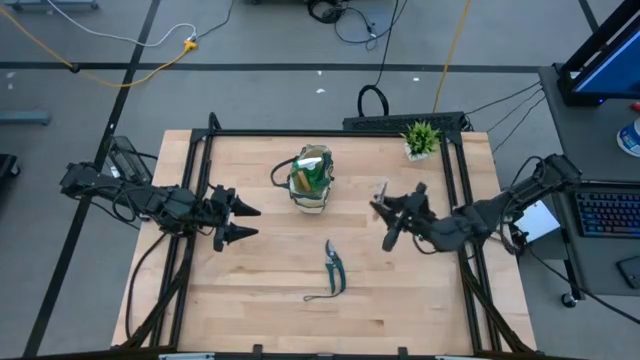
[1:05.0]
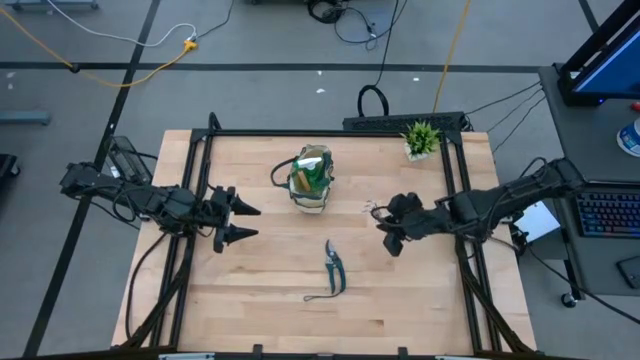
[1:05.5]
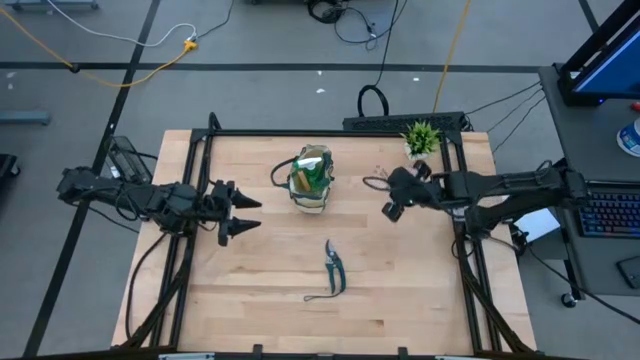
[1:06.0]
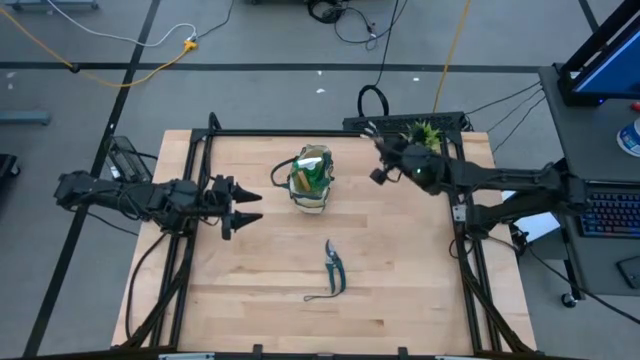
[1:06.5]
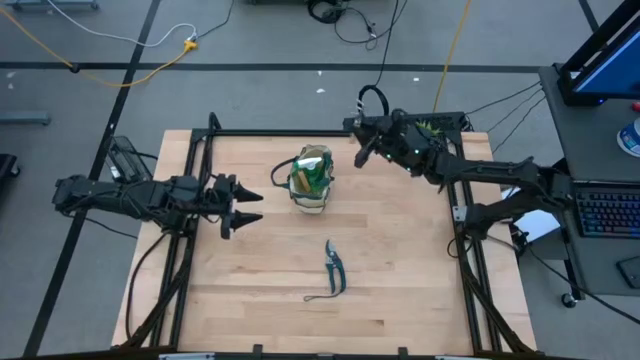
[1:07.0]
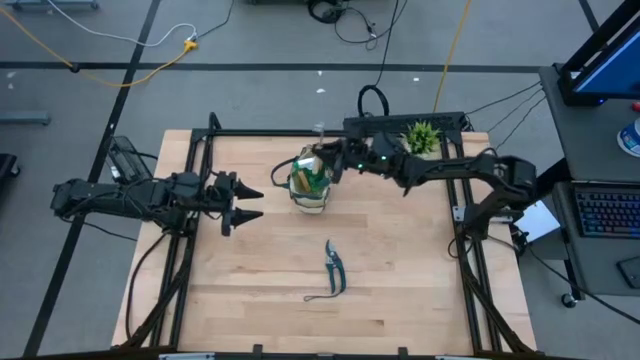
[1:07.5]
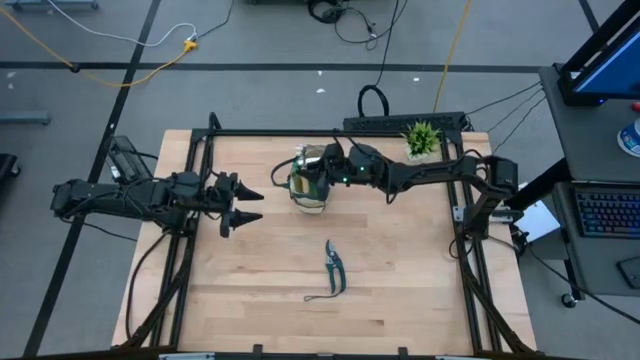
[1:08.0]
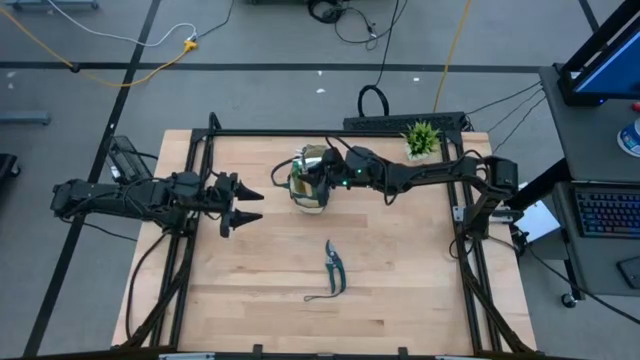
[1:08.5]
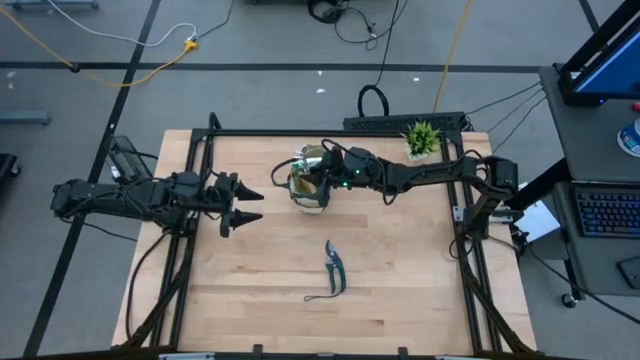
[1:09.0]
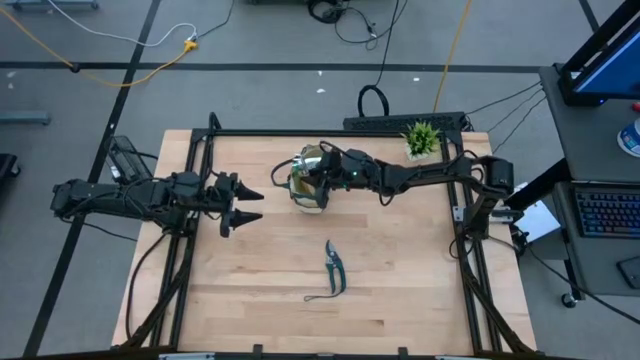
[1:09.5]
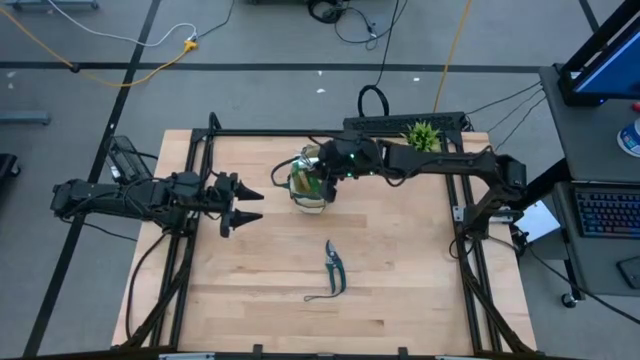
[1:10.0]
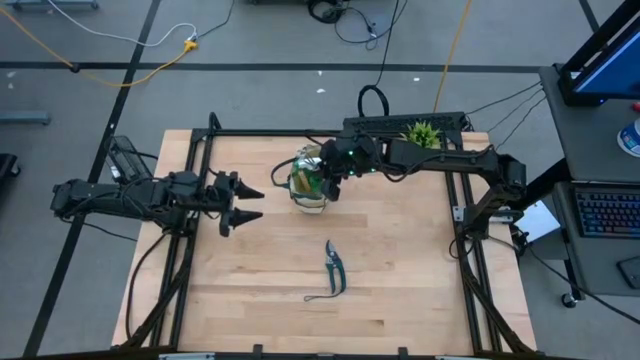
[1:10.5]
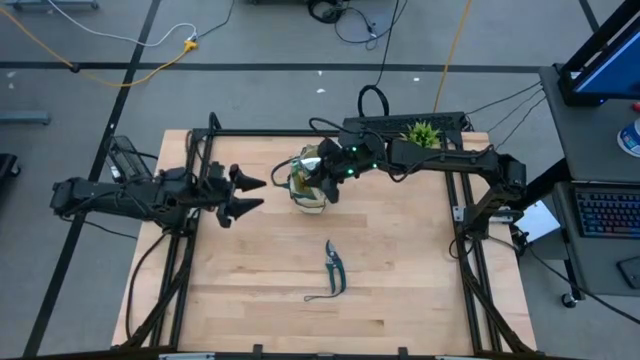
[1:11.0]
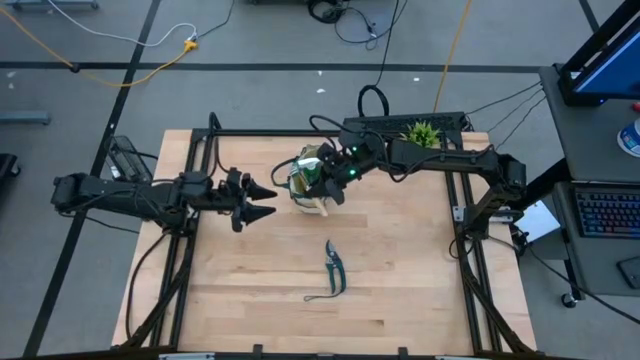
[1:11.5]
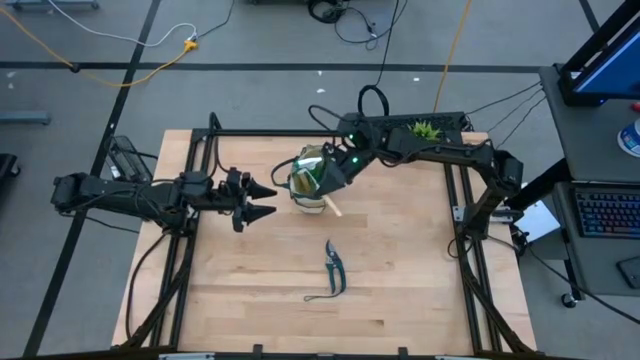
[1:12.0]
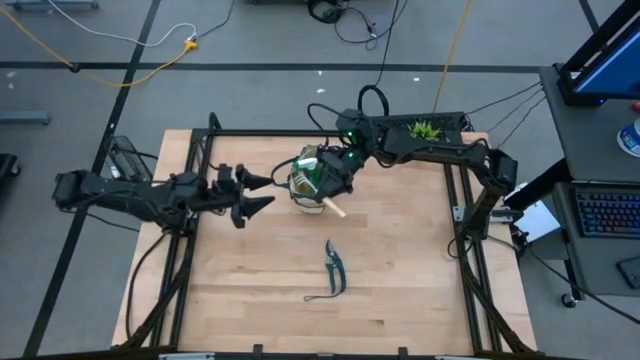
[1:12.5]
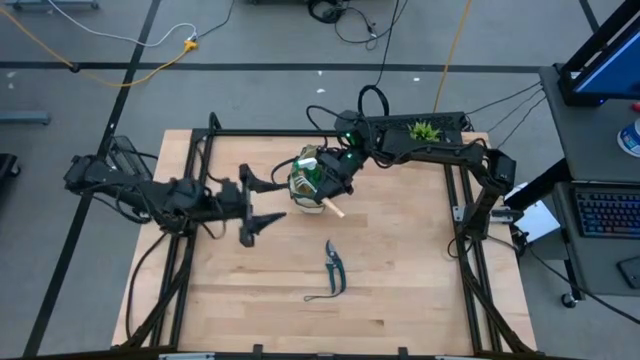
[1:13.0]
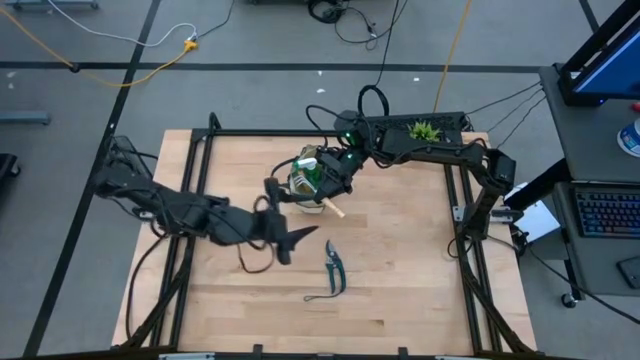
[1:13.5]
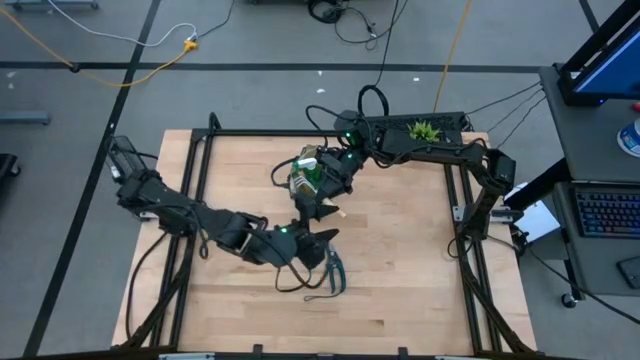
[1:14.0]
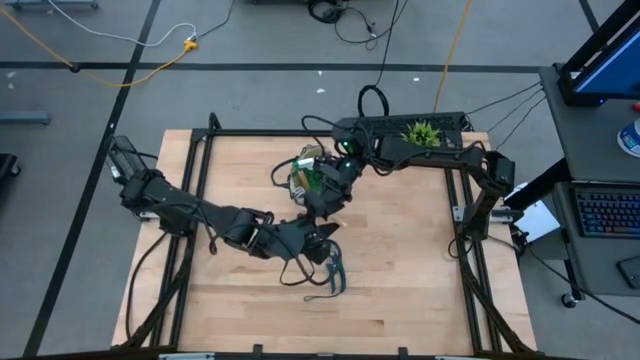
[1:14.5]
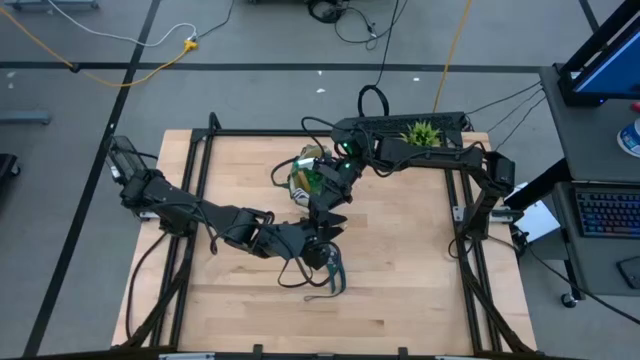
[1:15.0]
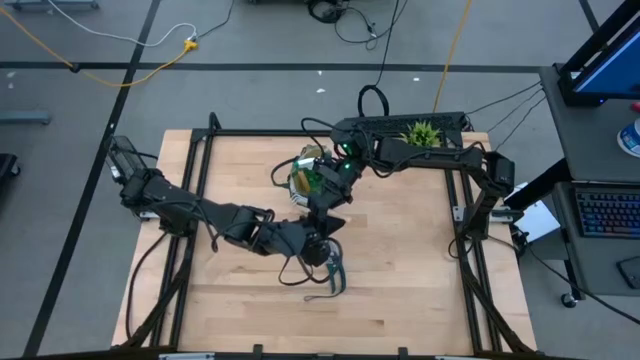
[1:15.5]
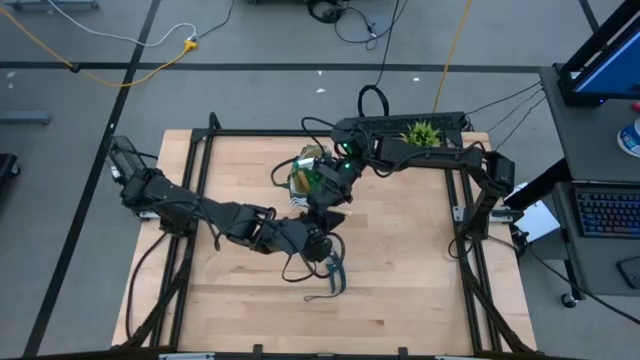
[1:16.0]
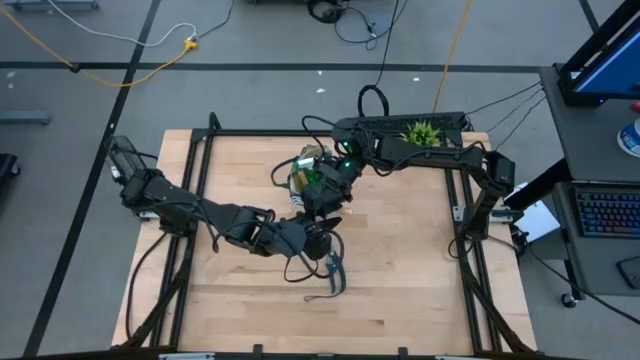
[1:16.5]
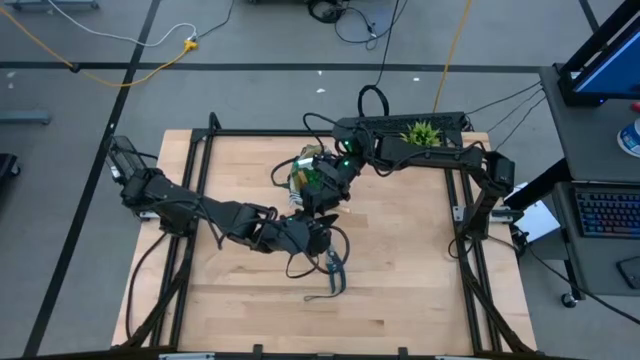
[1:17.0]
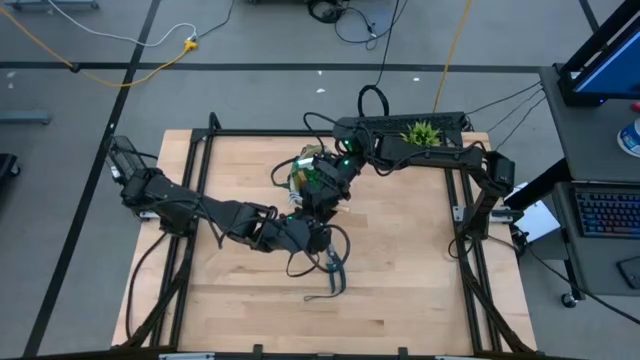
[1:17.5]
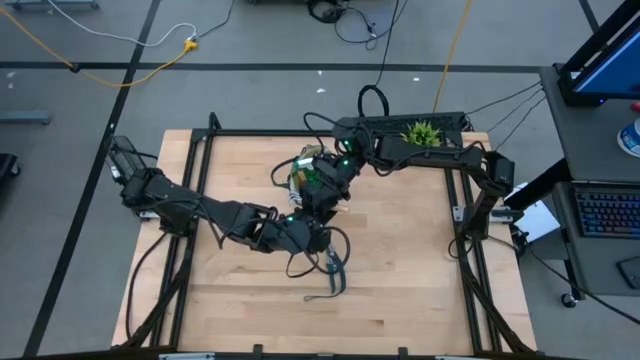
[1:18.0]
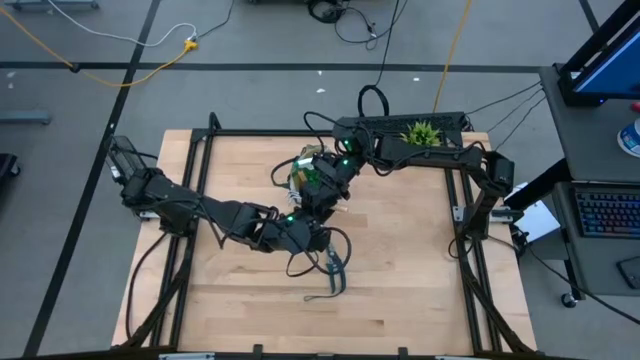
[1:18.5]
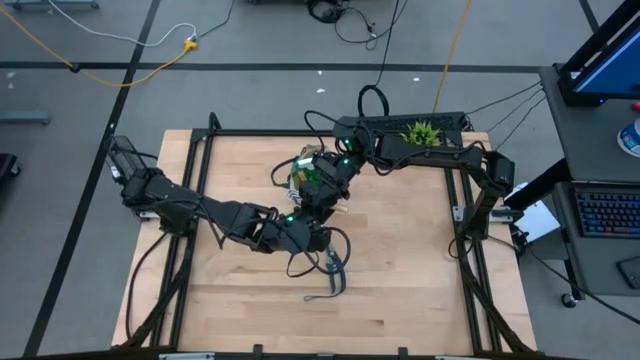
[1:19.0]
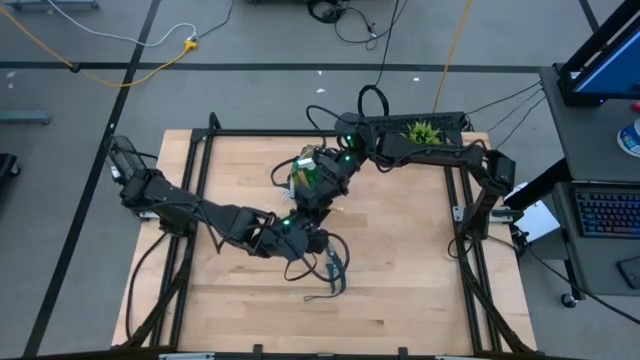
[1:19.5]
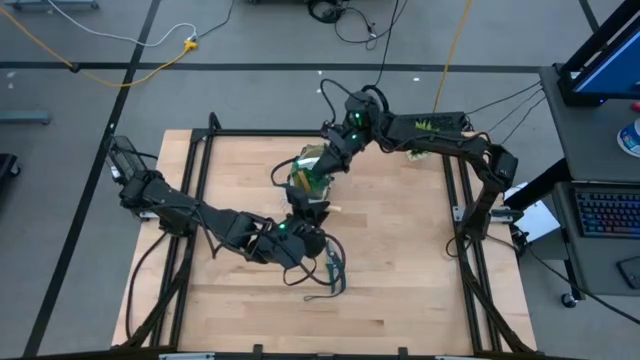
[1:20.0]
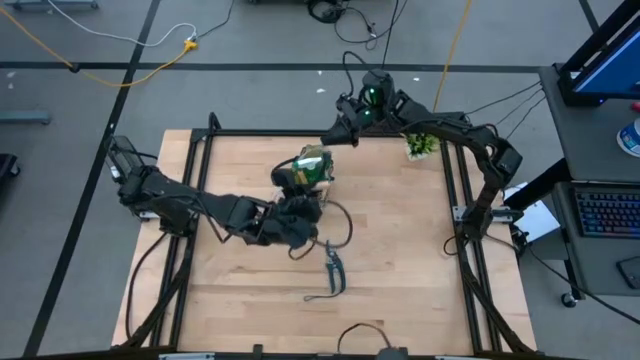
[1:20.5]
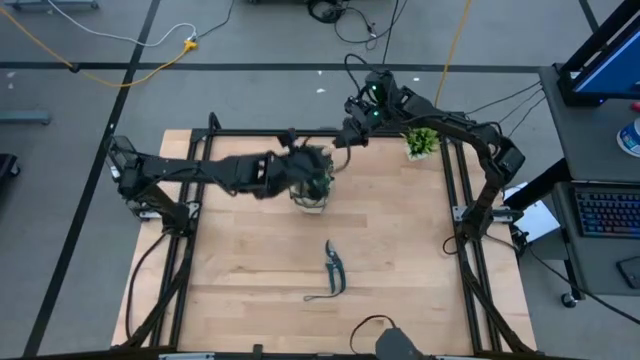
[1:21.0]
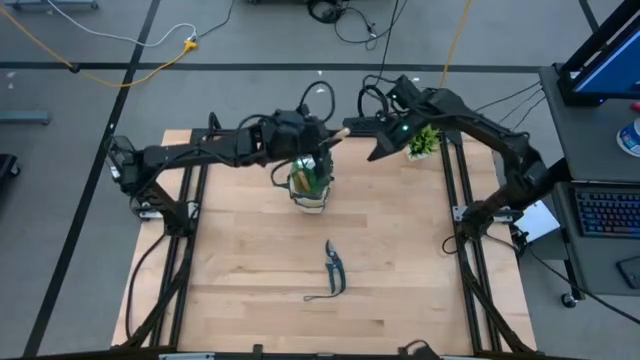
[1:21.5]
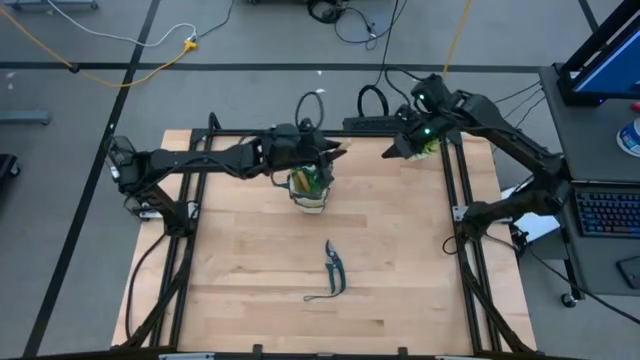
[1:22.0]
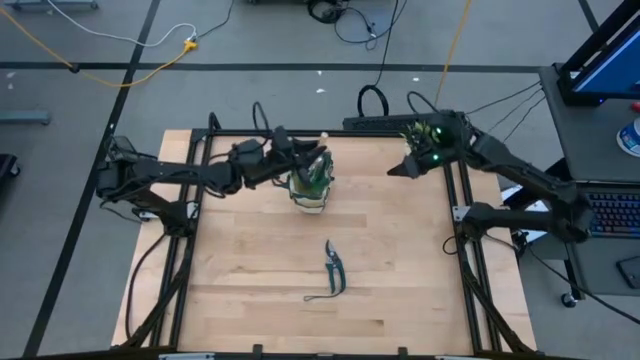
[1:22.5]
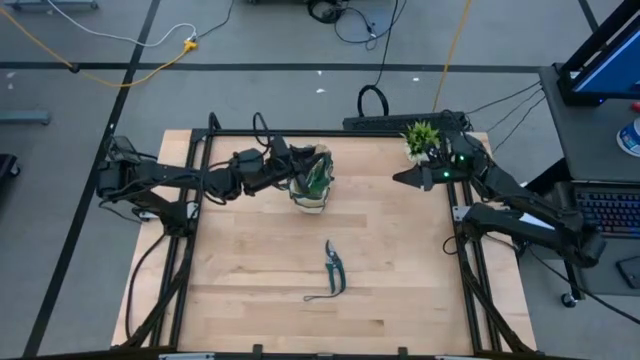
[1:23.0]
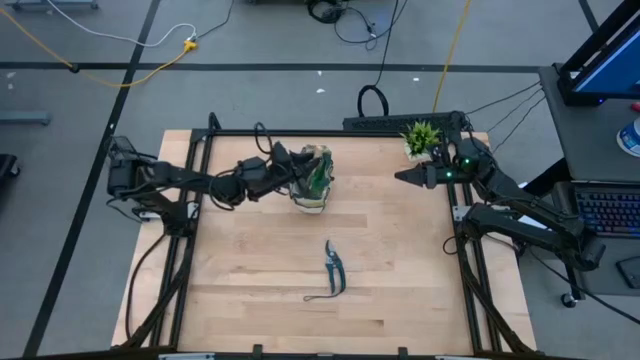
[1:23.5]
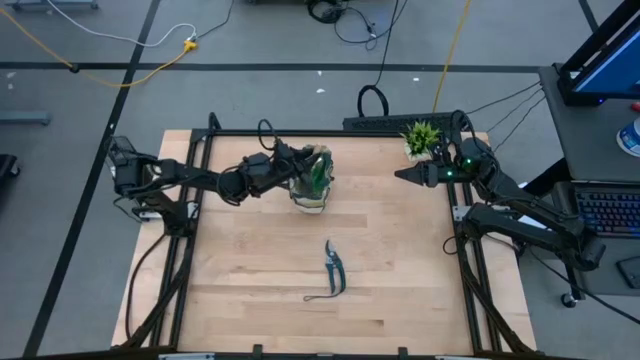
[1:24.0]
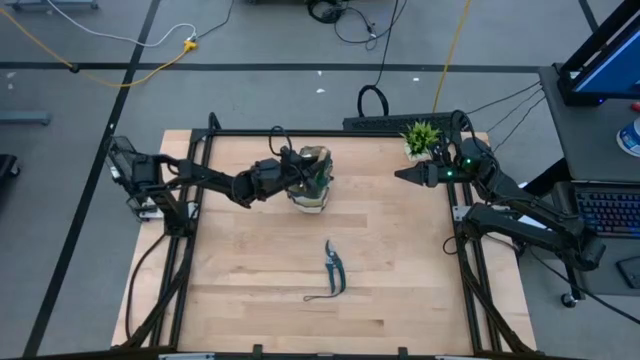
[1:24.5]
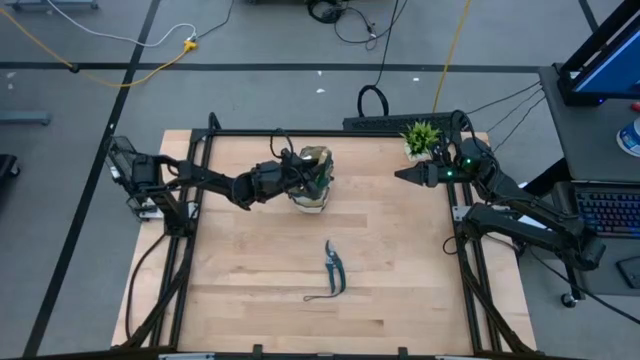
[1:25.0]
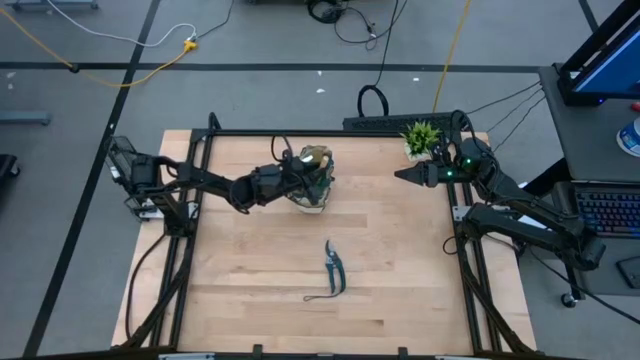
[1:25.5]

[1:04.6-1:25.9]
Task: Pick & Place Garden tools in Gardening bag
Put the left hand rake into the top gardening bag
